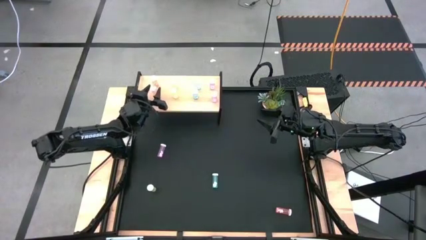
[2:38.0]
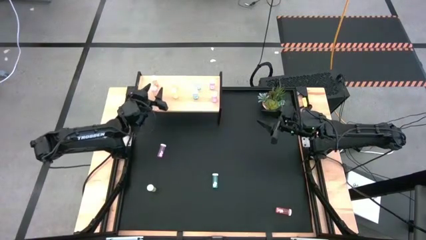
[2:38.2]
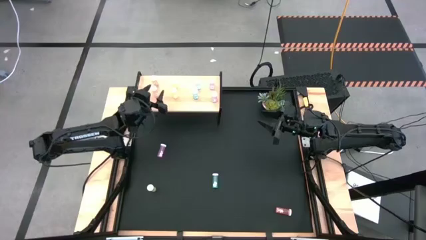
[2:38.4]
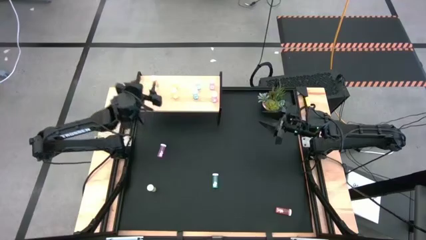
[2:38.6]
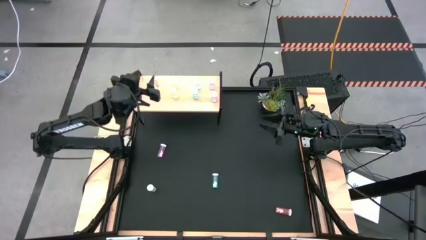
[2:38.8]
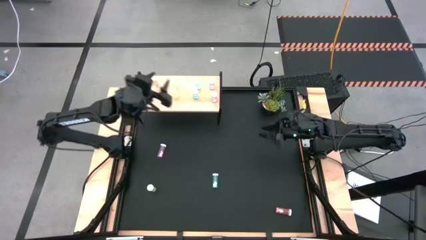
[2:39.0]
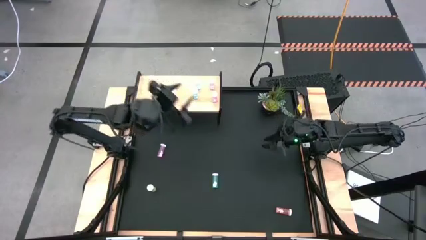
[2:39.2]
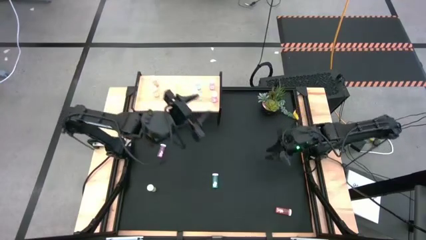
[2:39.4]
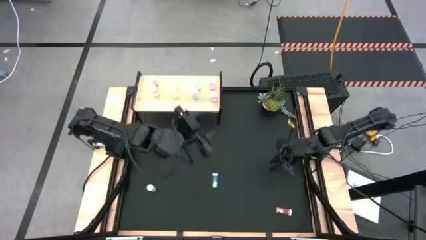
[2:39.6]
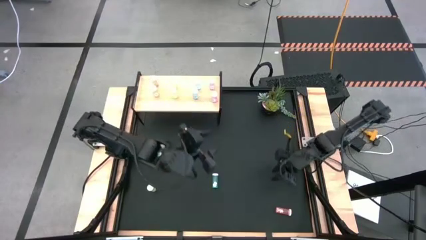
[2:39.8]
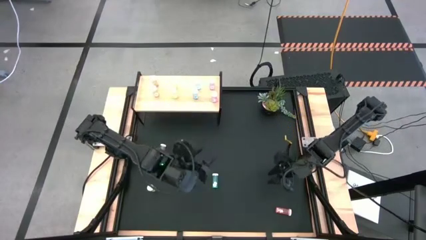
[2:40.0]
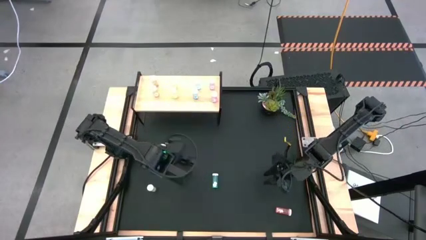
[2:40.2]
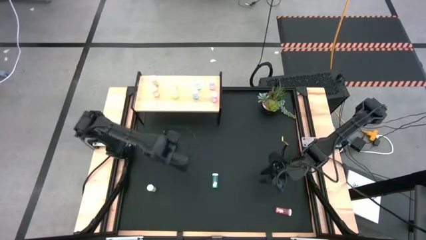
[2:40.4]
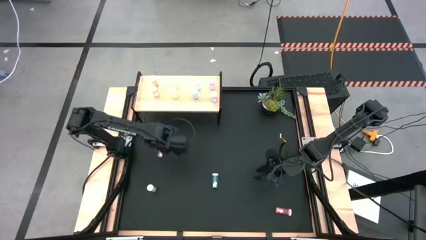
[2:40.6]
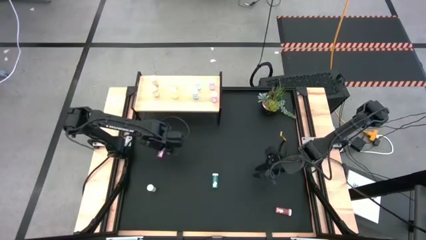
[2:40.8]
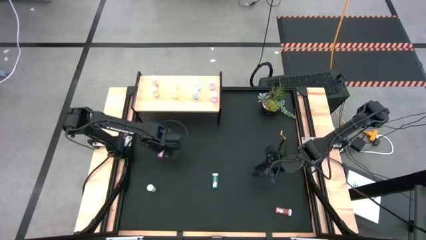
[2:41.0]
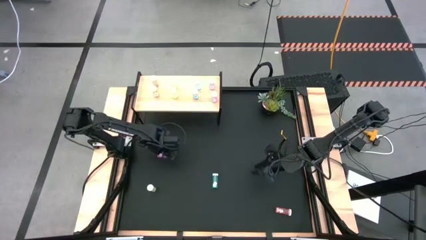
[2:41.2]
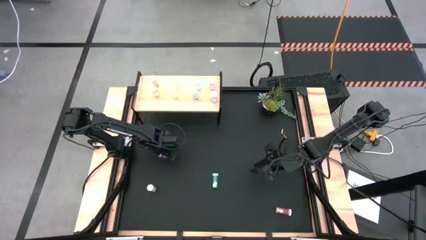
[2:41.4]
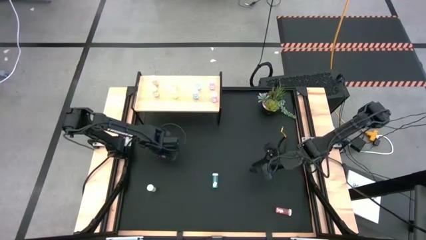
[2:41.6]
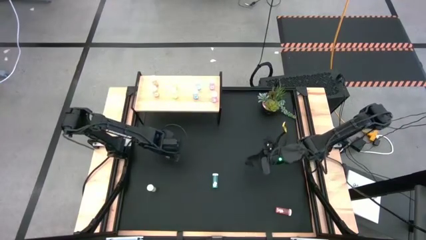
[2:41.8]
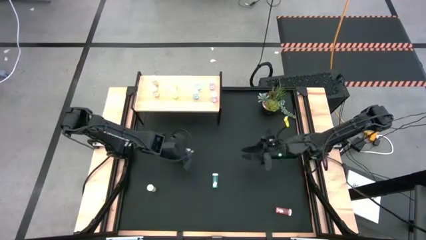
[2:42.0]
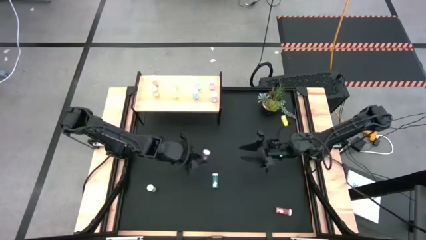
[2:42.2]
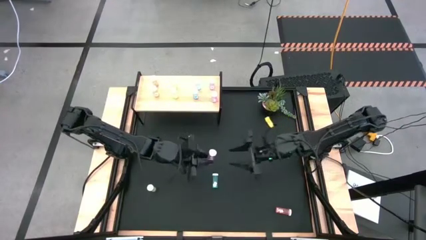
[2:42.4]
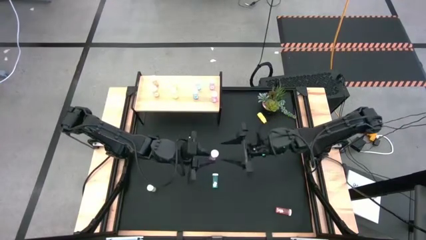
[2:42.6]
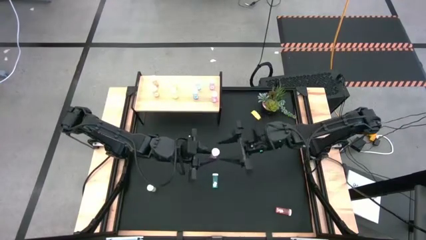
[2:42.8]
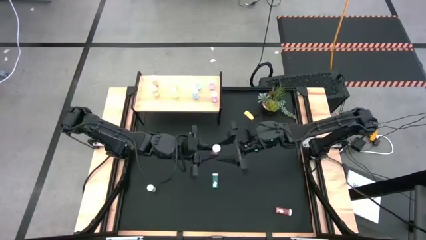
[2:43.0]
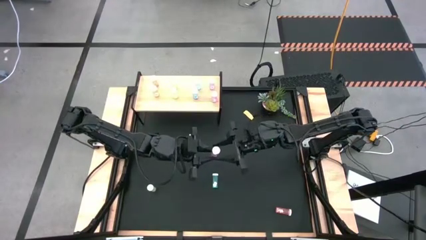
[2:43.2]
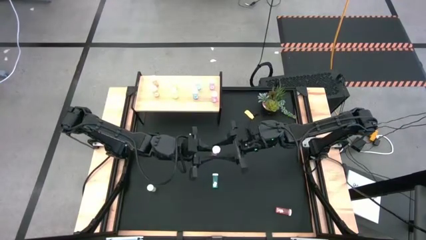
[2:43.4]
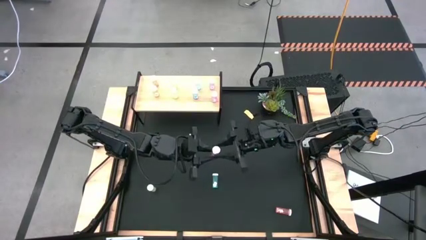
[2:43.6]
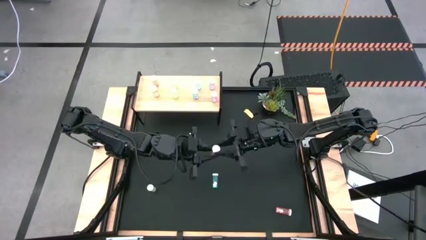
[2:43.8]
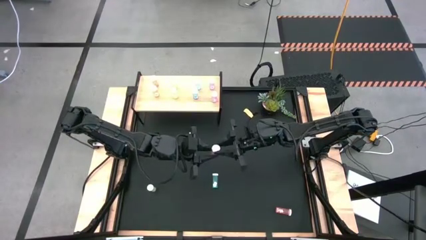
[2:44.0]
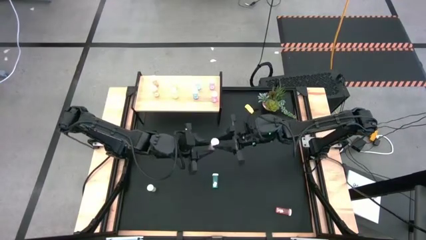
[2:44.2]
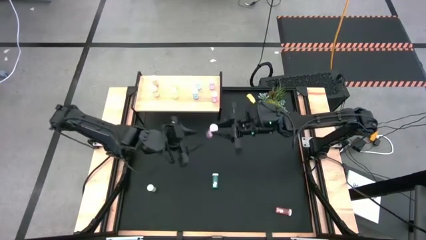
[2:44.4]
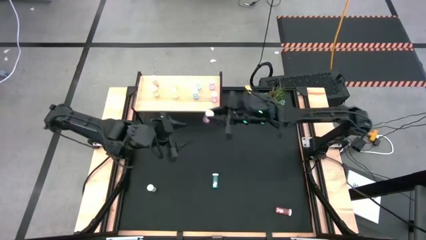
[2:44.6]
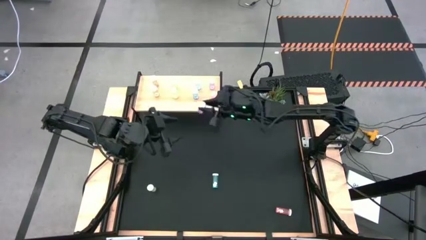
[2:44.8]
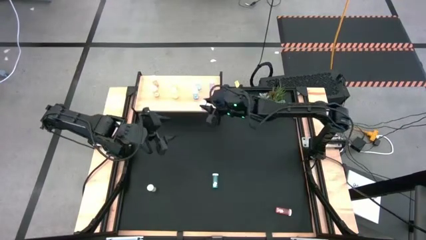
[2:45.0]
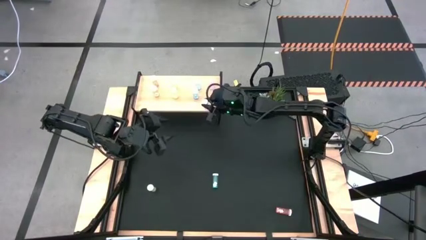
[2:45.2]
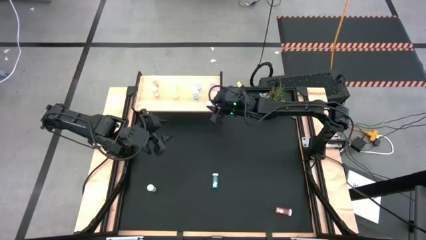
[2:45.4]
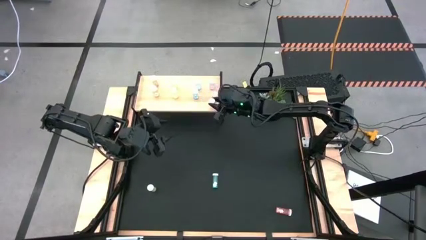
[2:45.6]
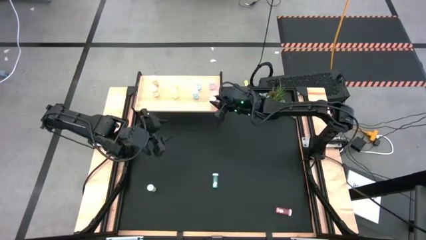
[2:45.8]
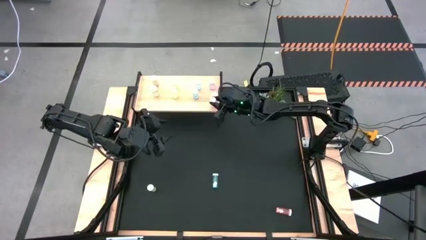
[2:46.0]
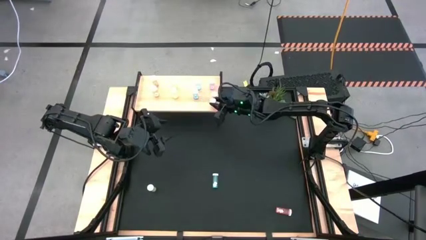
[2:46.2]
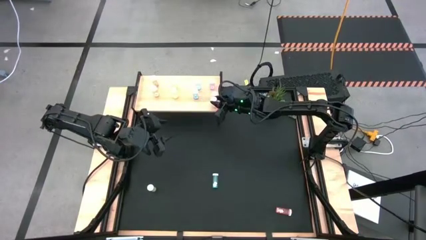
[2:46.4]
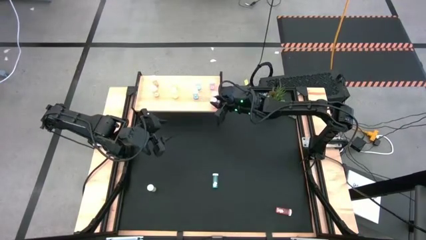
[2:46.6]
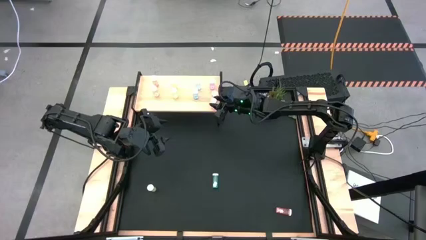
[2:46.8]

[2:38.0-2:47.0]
Task: Pick and place medicine bottles onto shelf by color
Put the pink pill bottle on the shelf aligned with the other pink pill bottles

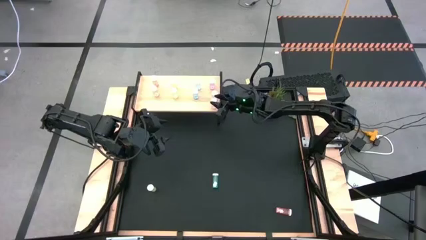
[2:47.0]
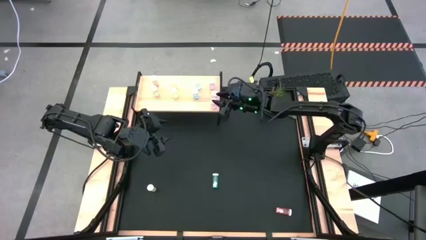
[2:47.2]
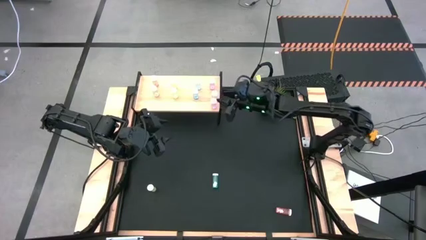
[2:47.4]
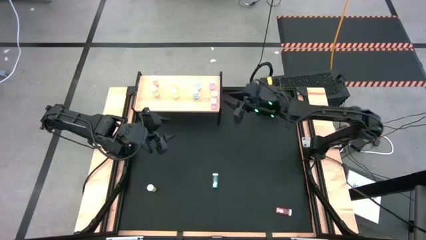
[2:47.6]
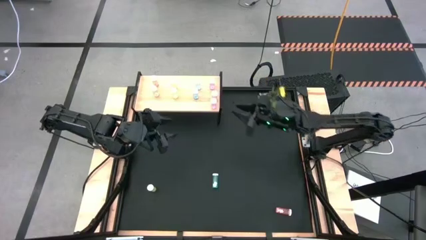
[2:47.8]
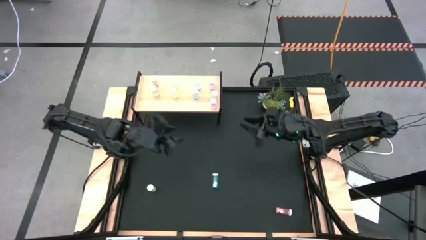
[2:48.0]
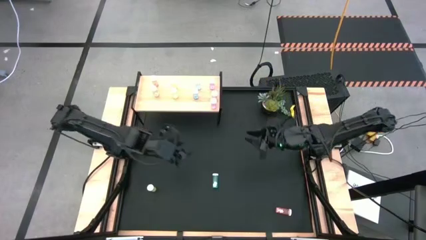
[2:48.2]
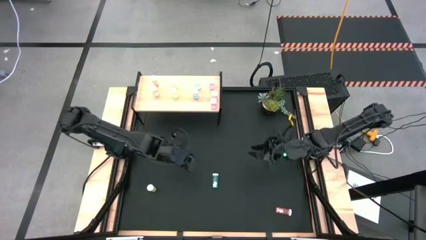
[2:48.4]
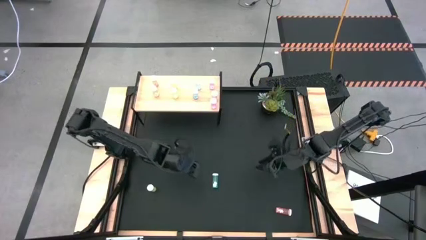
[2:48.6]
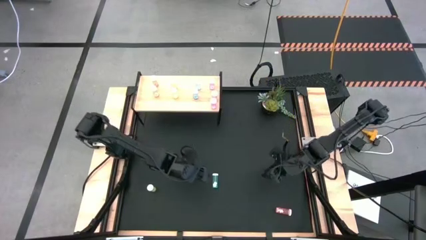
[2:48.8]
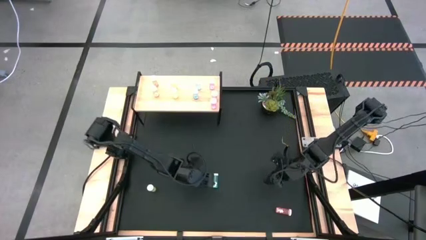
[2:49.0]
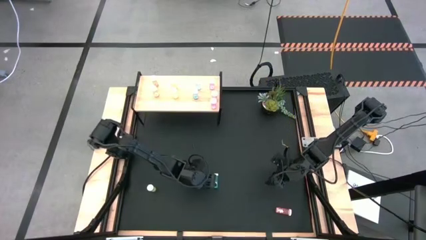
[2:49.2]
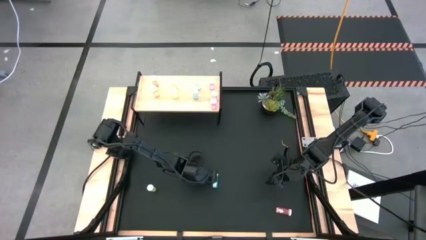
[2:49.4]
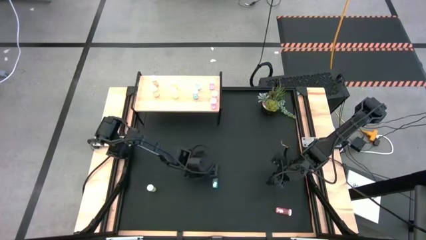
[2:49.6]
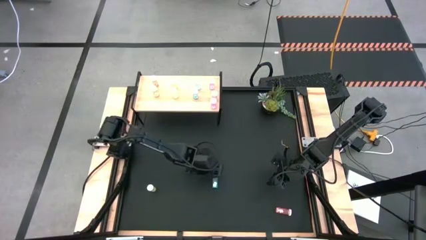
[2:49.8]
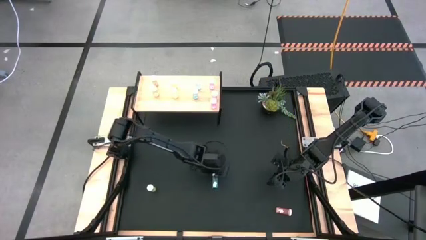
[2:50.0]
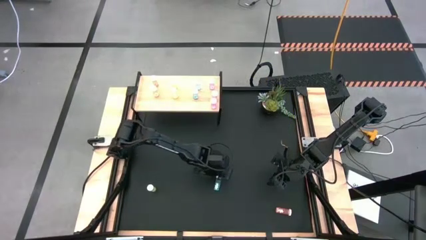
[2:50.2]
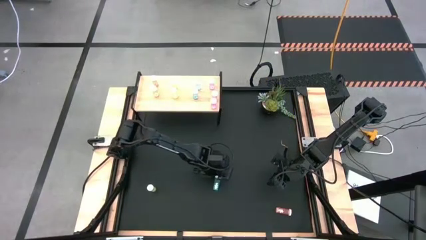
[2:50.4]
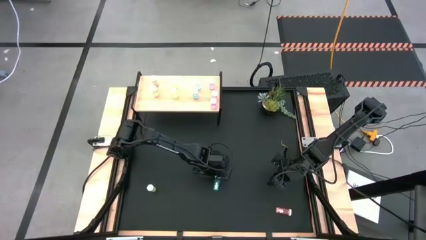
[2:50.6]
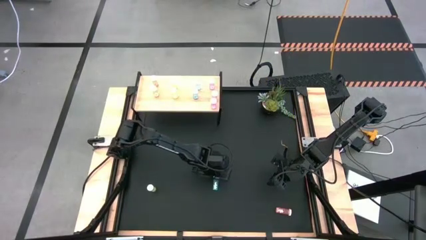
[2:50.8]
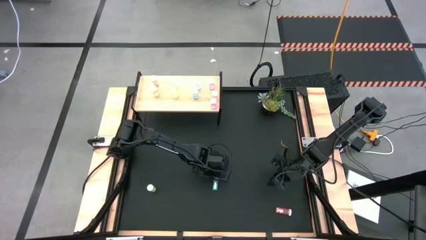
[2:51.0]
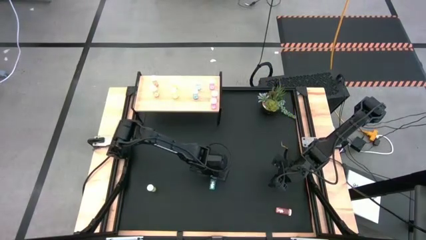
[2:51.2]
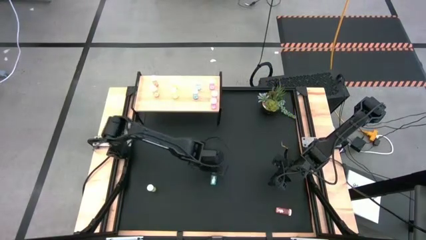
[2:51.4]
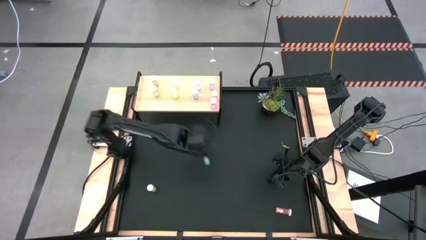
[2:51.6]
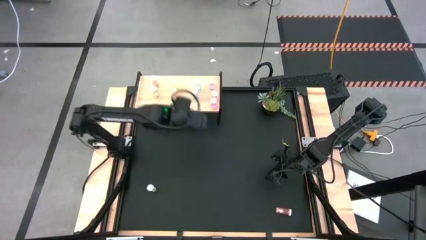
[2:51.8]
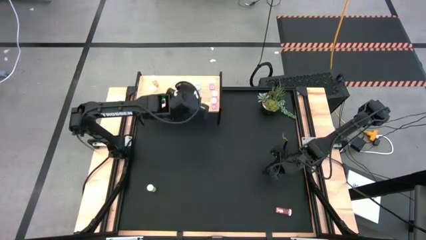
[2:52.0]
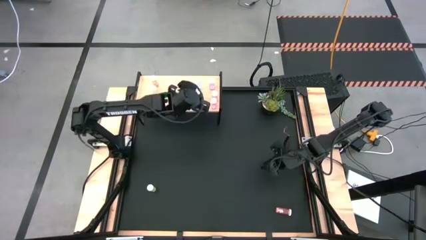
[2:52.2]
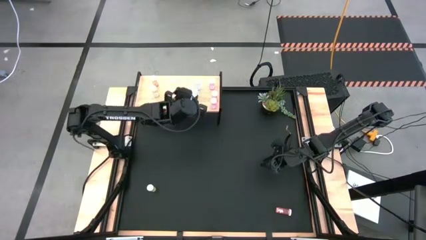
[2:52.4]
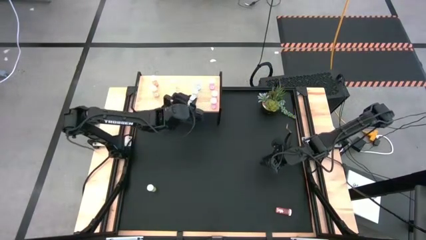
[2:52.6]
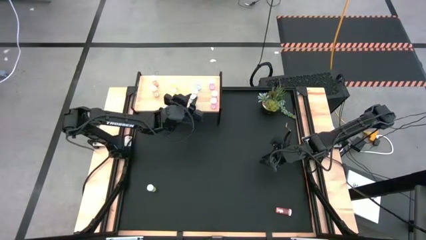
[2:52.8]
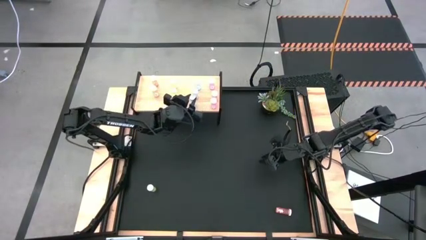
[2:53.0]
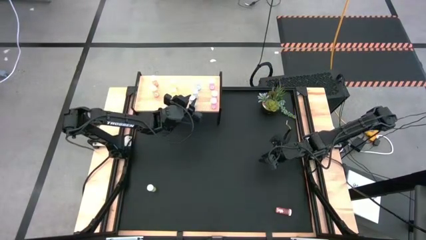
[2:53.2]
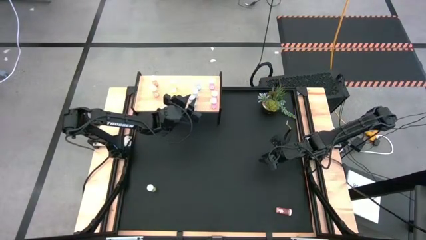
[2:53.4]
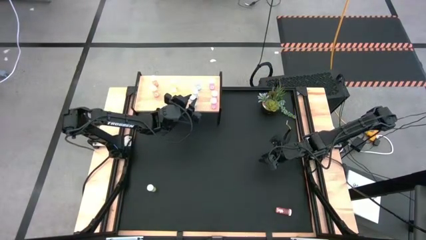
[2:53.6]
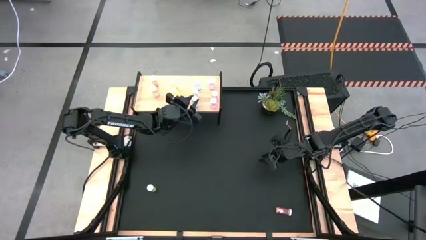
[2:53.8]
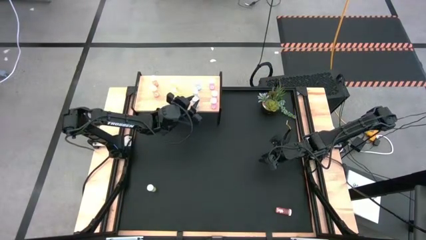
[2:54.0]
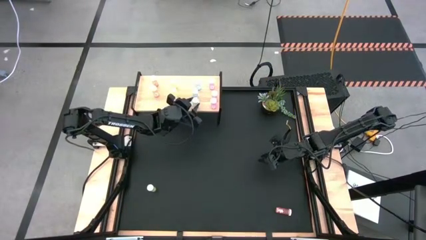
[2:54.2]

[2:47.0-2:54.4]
Put the blue pill bottle on the shelf aligned with the other blue pill bottles
